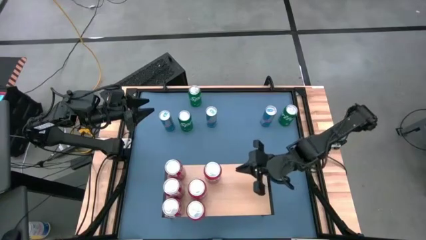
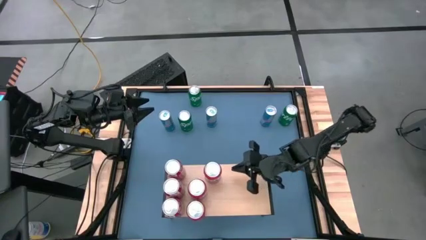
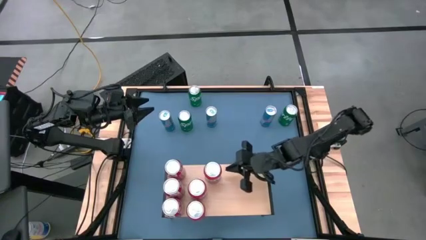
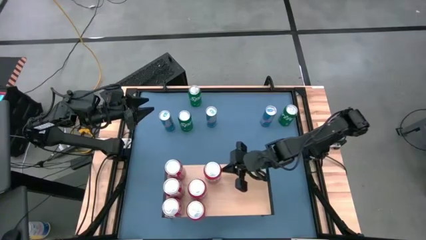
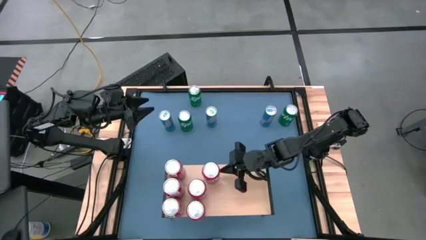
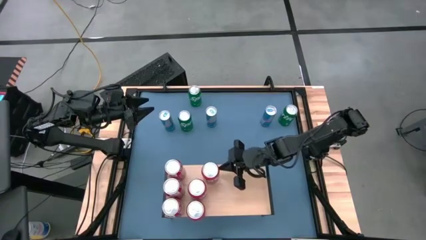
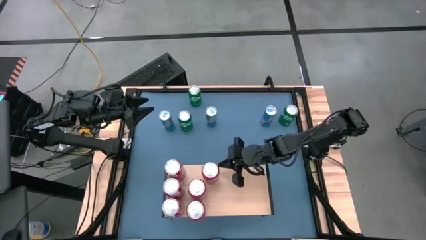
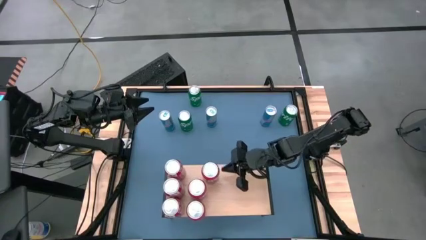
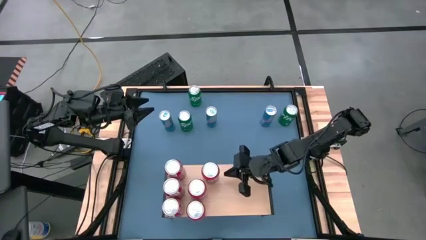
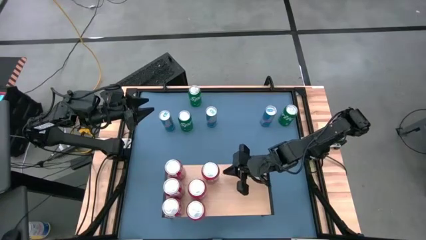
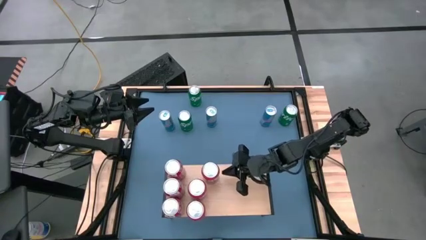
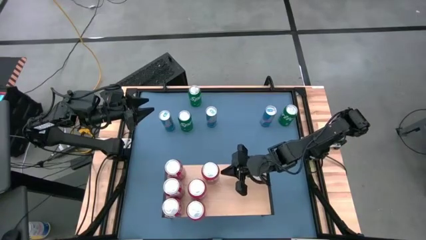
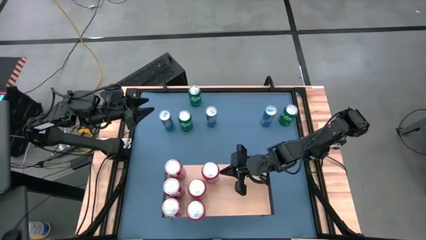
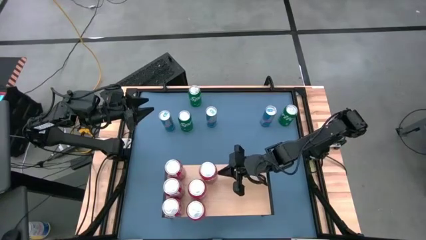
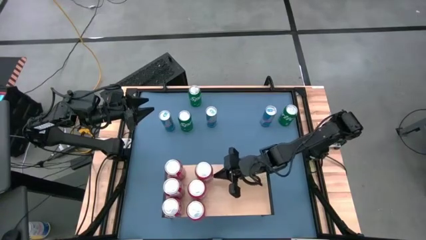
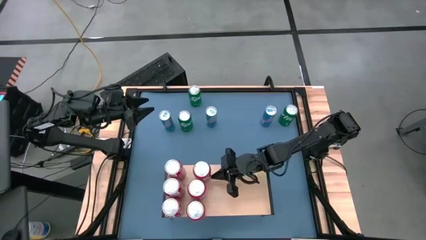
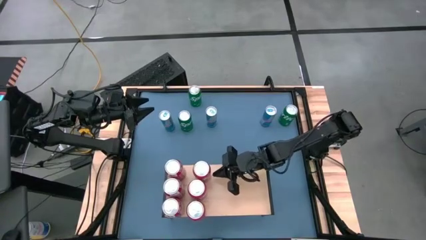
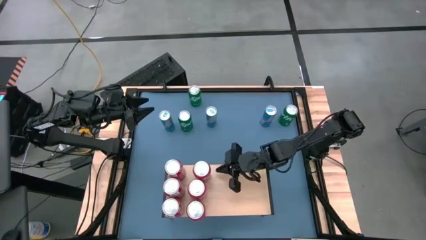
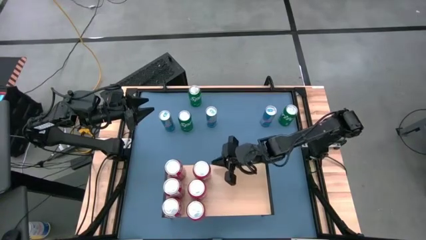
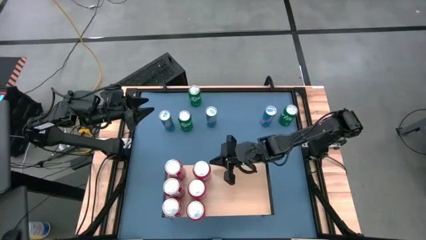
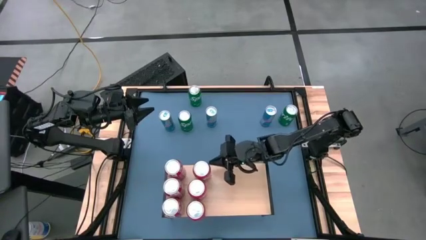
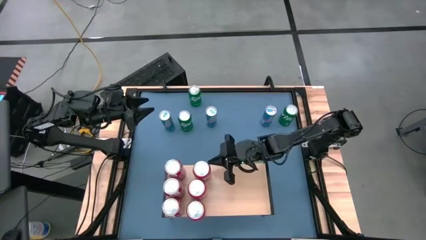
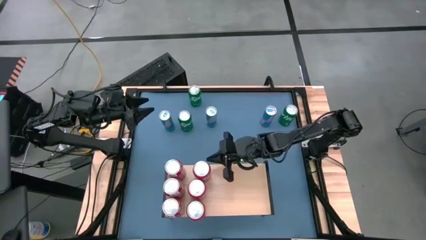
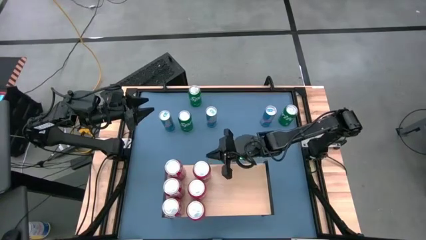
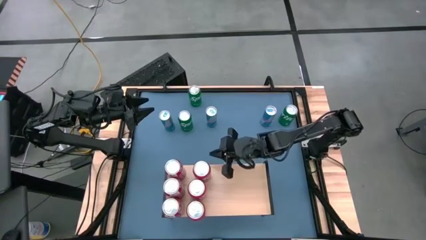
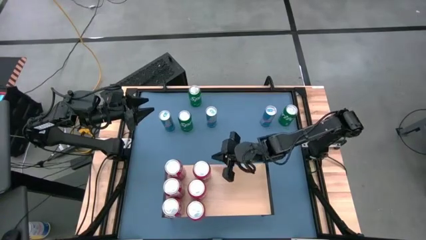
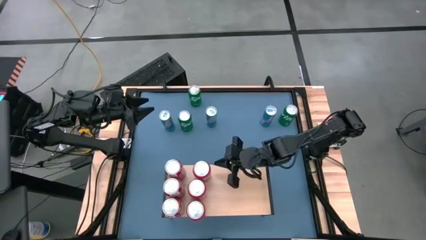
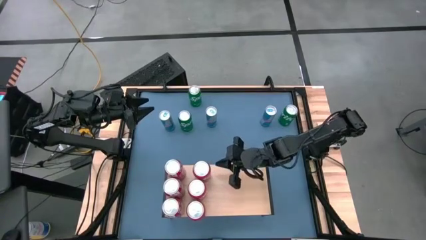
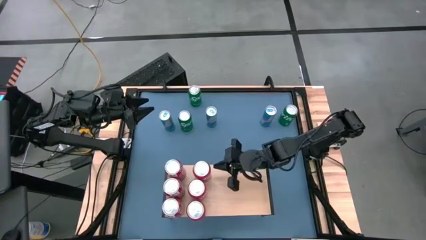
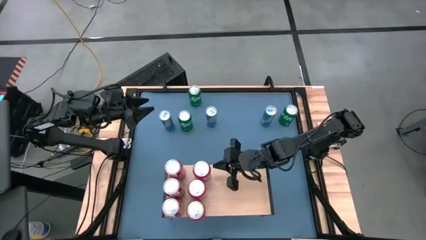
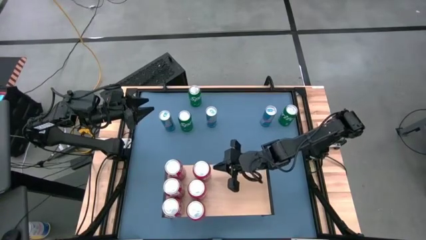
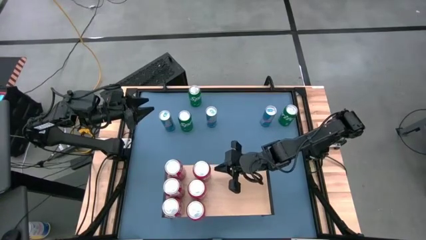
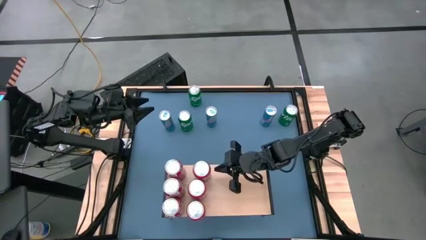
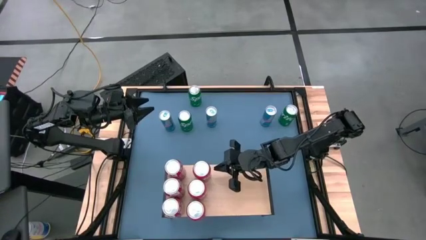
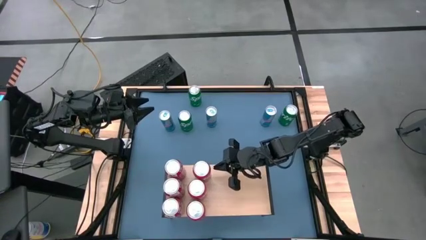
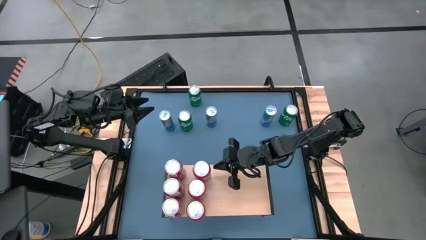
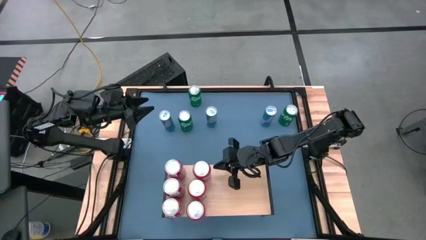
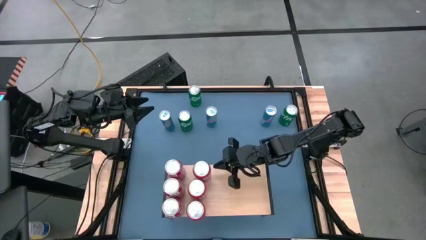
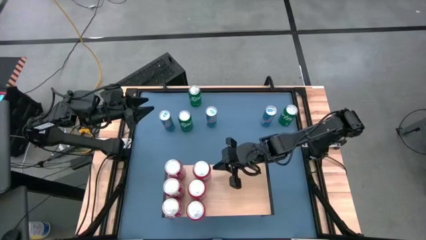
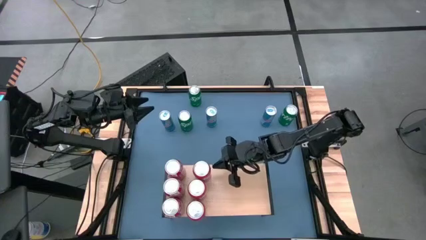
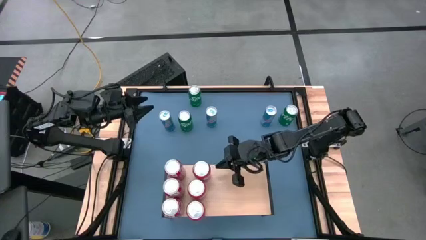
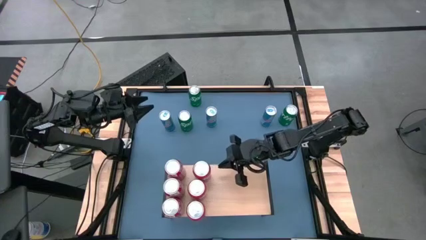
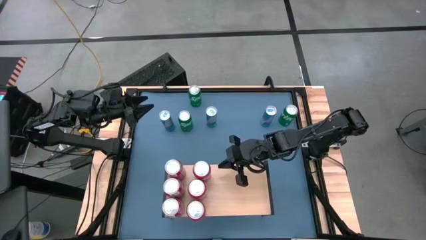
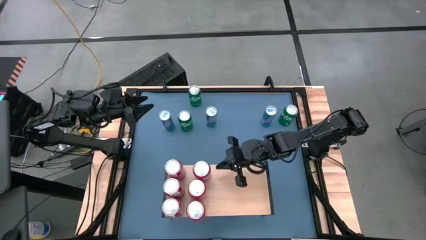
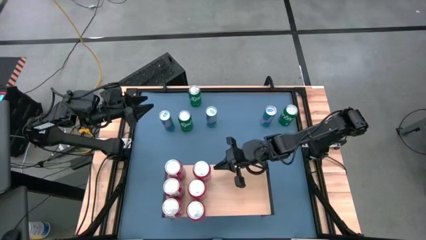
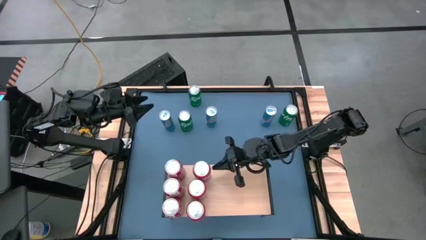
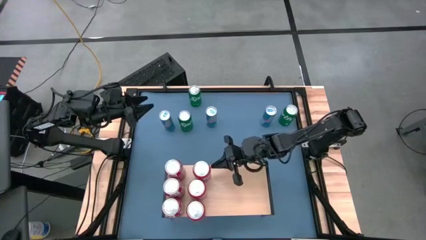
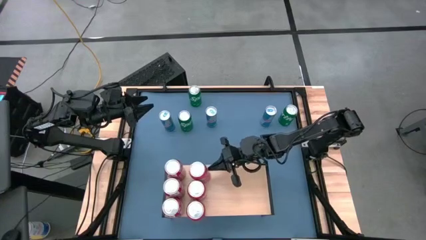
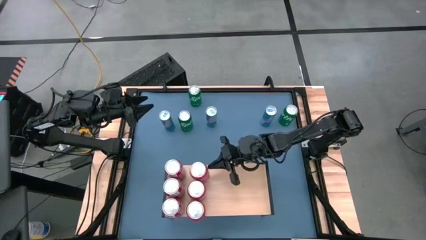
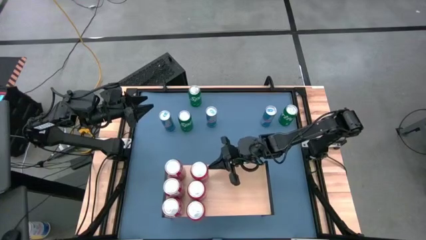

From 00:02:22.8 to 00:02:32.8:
Task: Place canned beverage on shelf
Put the orange soda can on the shelf aligned with the other orange soda cans
